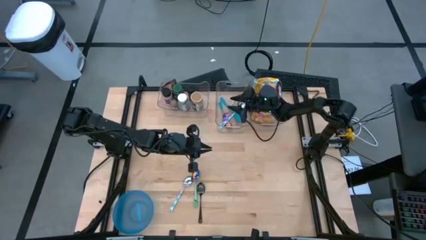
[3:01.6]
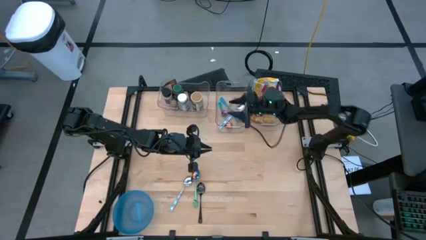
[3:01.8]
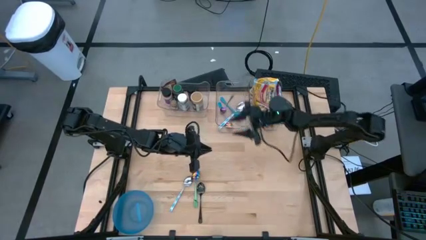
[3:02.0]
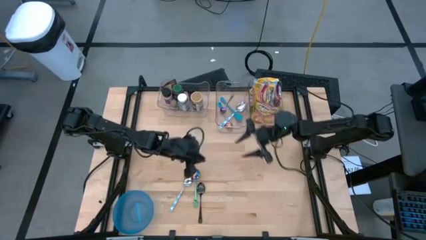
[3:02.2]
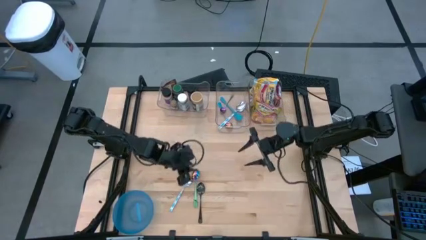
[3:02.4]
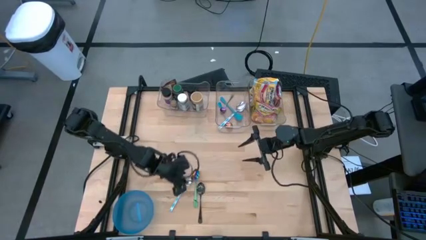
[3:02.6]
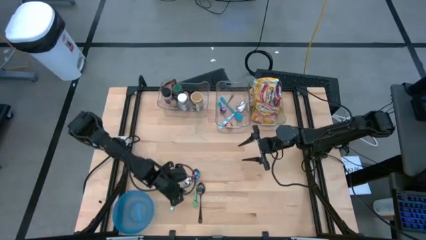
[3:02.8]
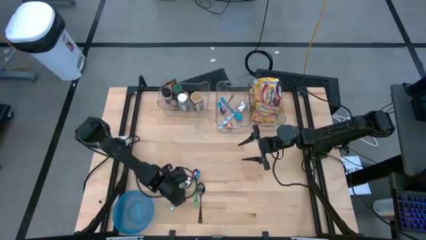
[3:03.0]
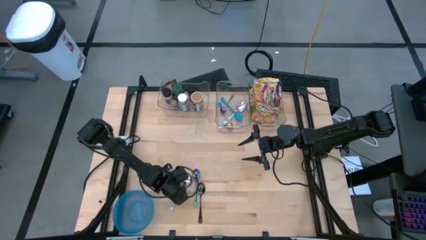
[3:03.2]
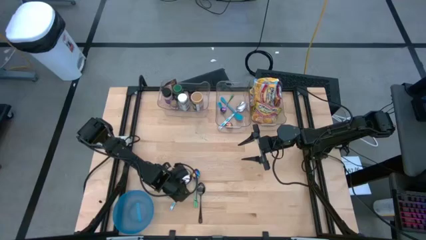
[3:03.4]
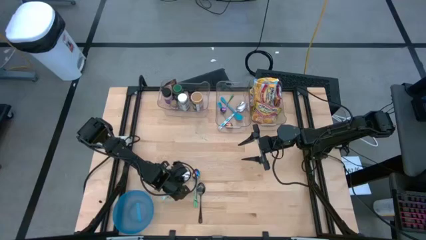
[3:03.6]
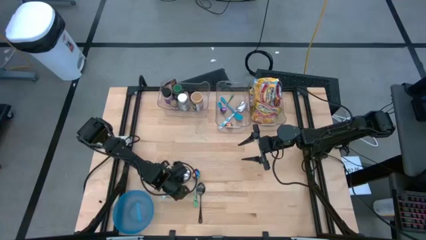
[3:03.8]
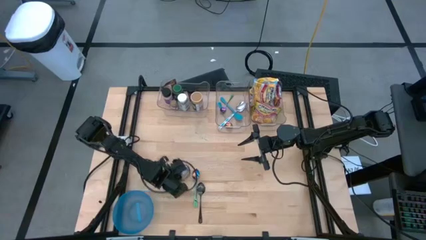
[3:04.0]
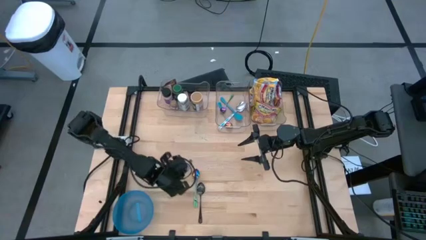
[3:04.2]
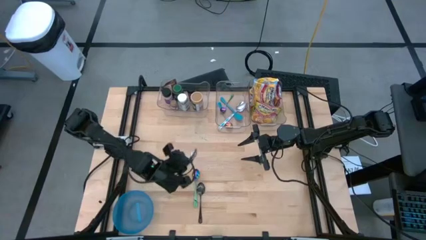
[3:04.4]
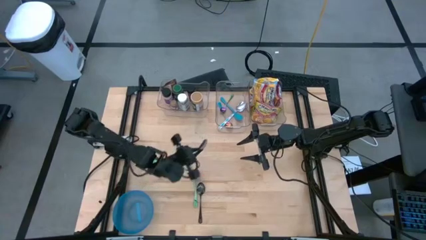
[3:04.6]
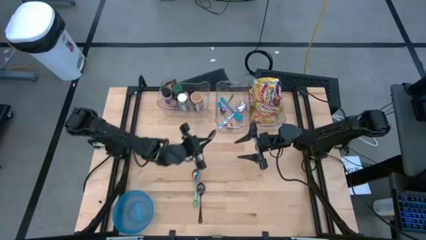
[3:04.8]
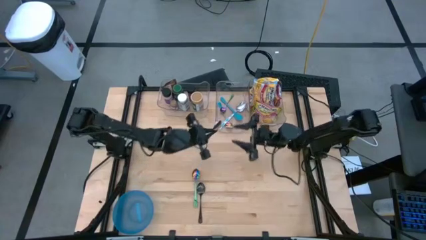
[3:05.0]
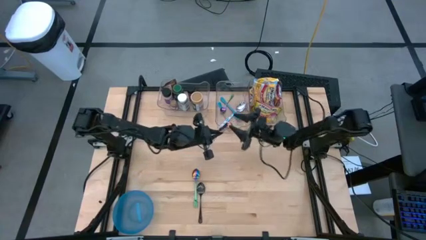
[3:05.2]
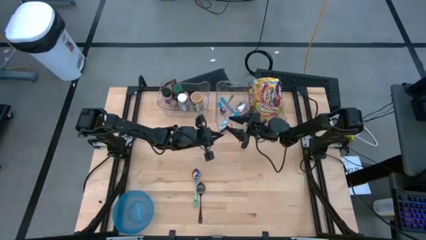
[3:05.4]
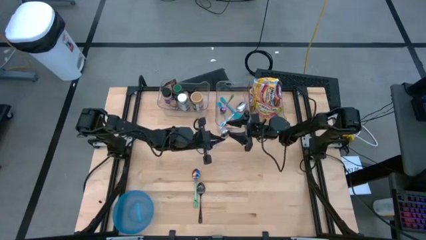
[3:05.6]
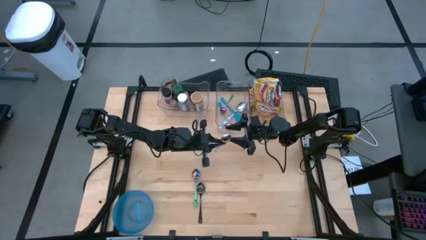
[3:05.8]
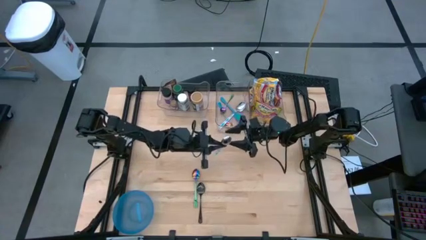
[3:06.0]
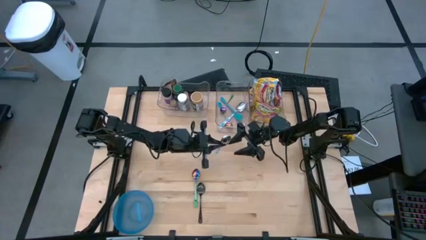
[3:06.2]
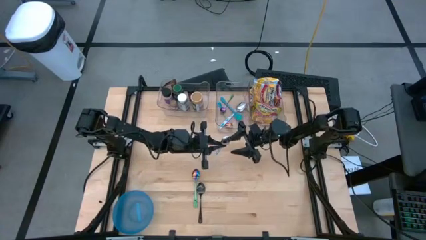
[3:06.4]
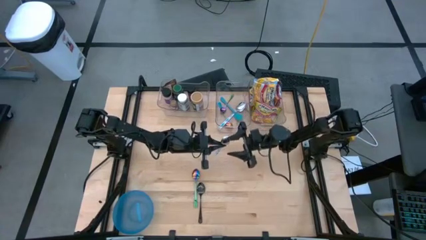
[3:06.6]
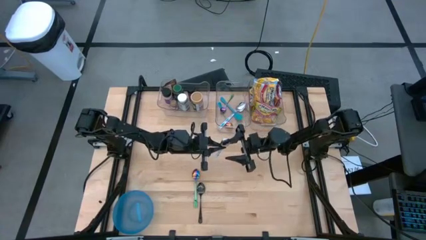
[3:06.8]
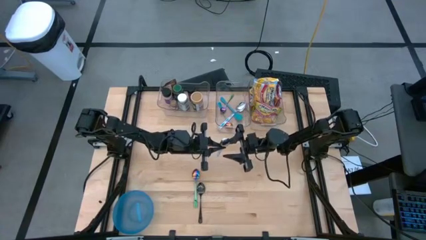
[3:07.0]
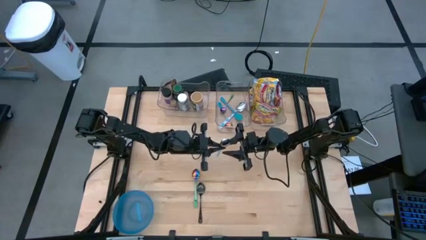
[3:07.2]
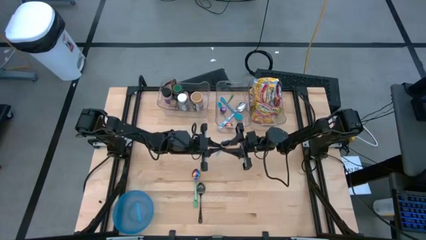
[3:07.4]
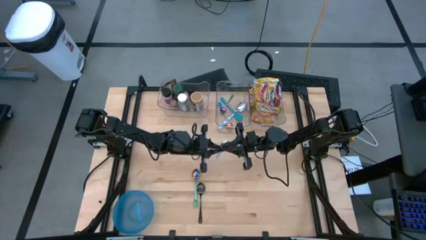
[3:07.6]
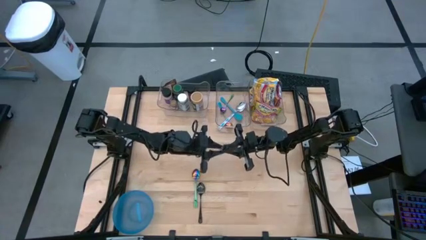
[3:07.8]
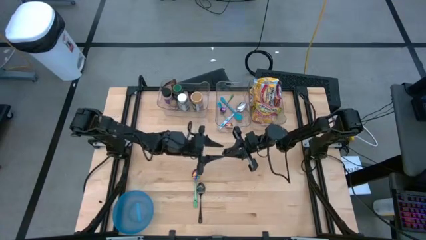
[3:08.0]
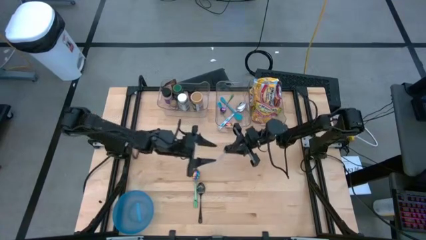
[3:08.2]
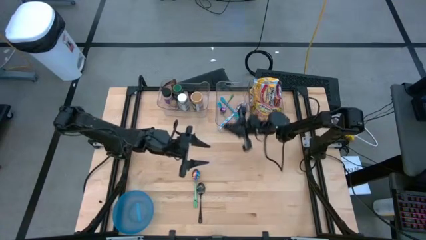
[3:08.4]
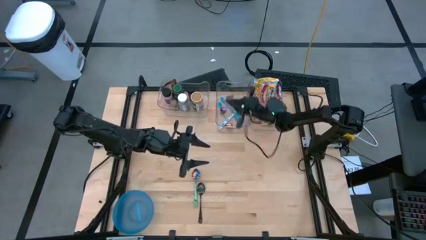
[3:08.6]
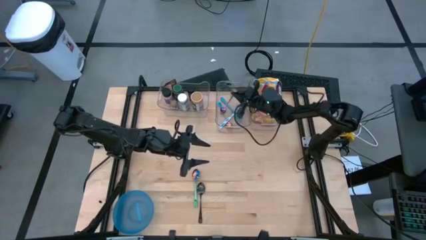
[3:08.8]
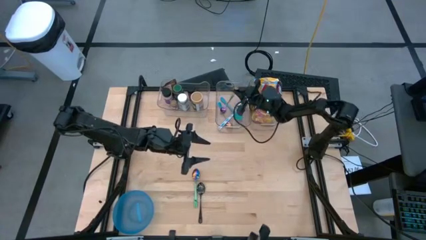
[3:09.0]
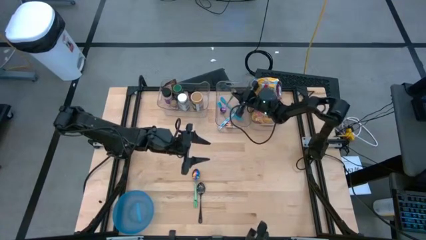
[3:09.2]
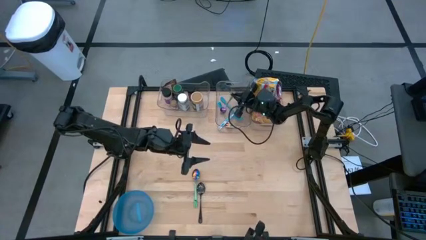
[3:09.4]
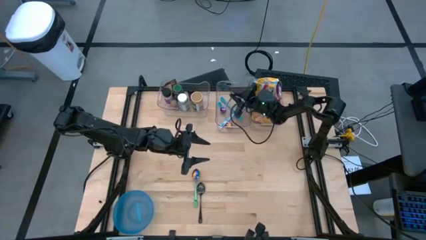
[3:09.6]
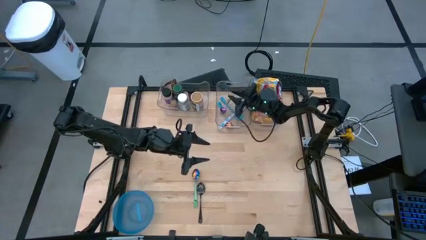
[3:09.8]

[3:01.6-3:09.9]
Task: Pick & Place Food Item
Put the silver spoon into the middle transparent bin

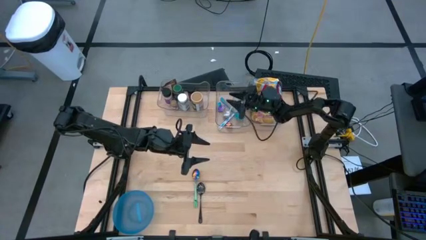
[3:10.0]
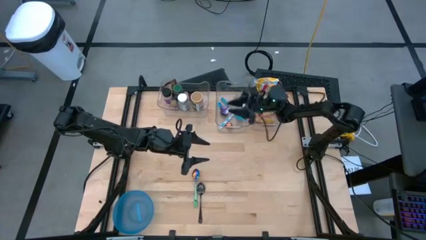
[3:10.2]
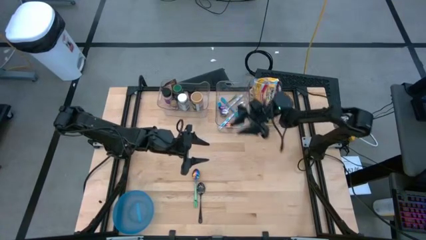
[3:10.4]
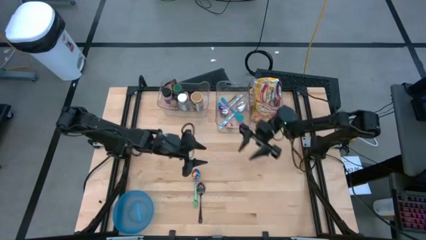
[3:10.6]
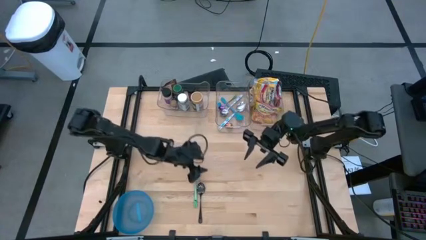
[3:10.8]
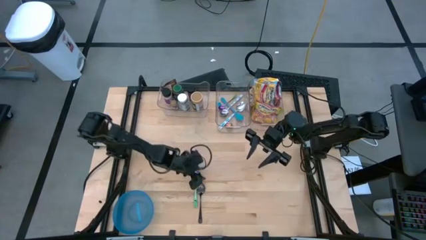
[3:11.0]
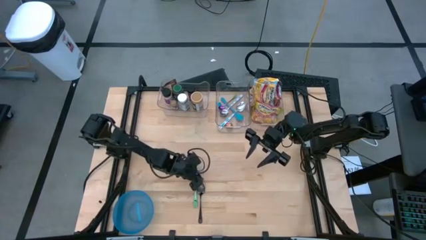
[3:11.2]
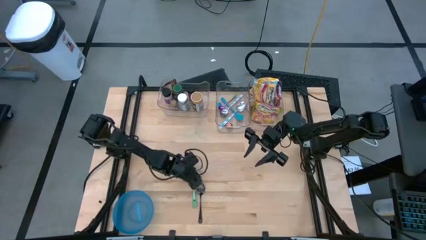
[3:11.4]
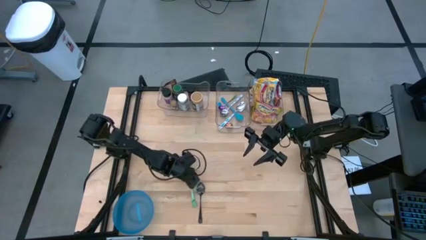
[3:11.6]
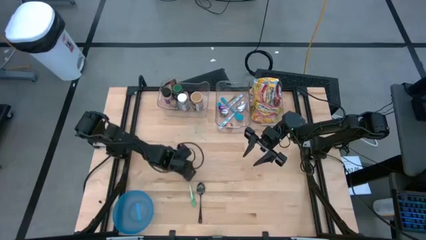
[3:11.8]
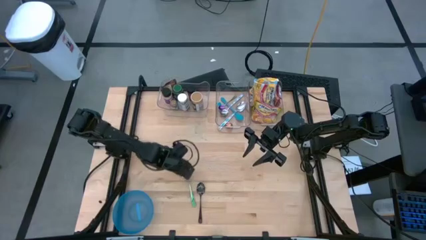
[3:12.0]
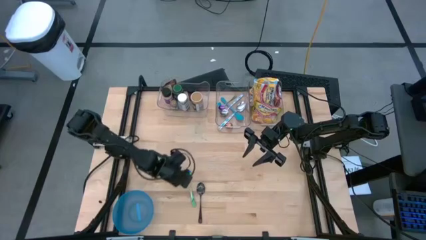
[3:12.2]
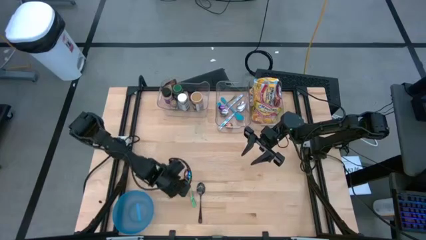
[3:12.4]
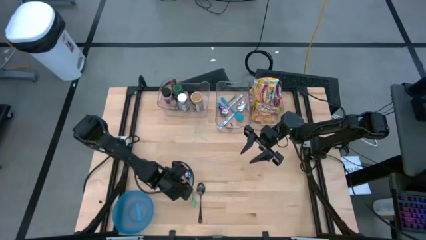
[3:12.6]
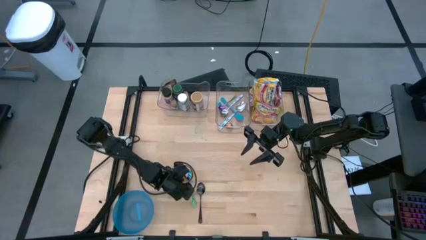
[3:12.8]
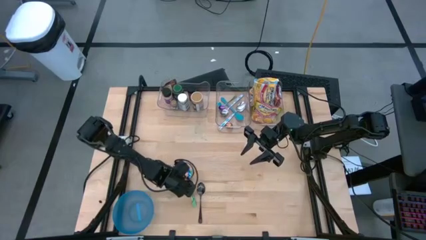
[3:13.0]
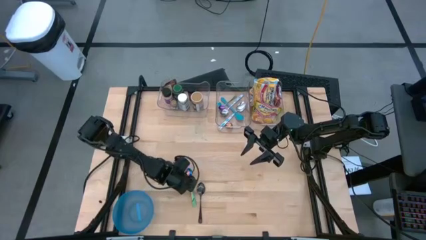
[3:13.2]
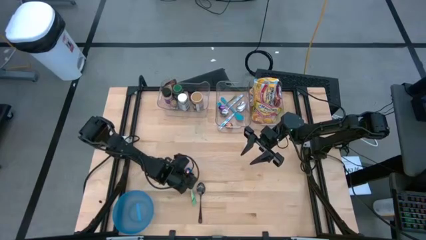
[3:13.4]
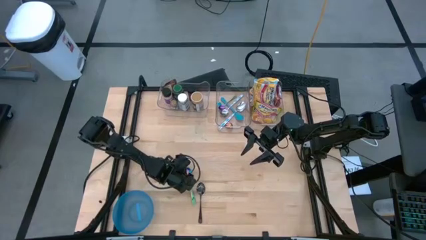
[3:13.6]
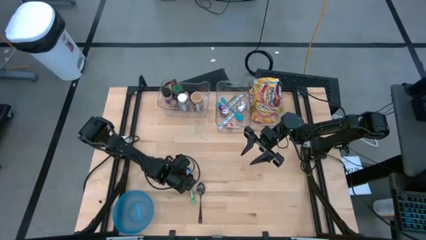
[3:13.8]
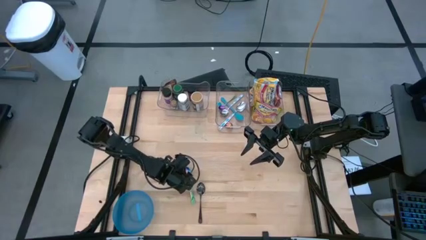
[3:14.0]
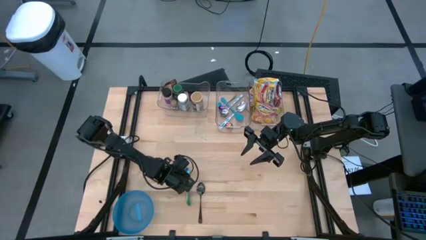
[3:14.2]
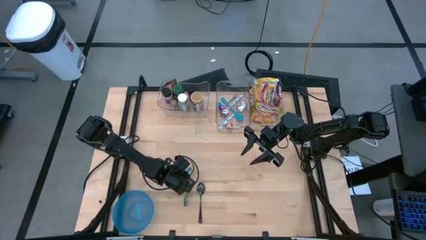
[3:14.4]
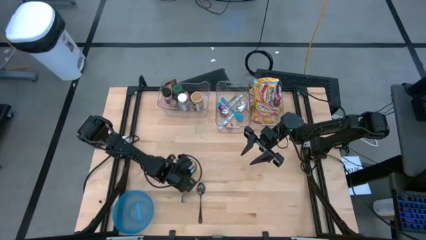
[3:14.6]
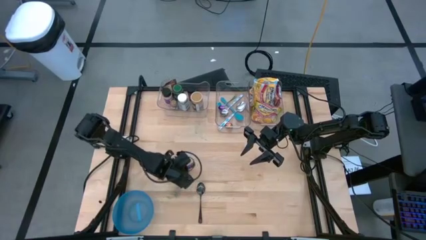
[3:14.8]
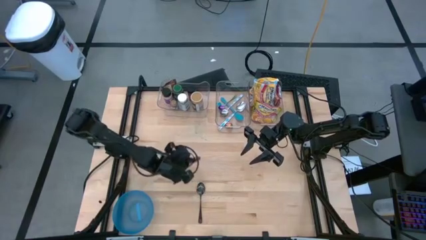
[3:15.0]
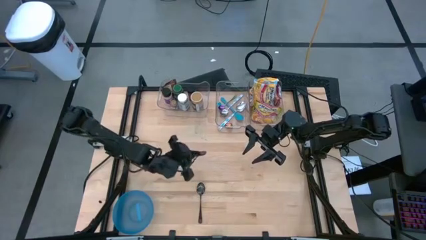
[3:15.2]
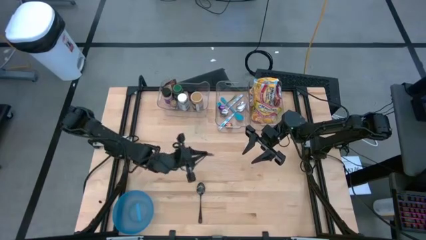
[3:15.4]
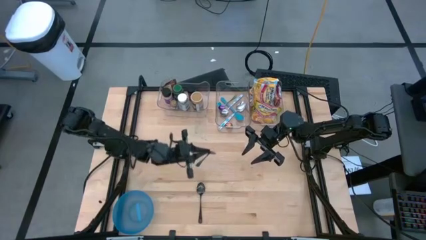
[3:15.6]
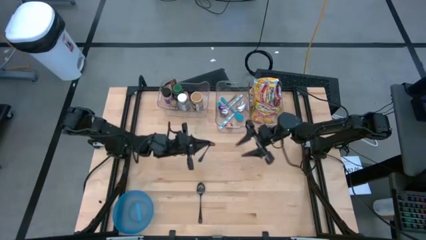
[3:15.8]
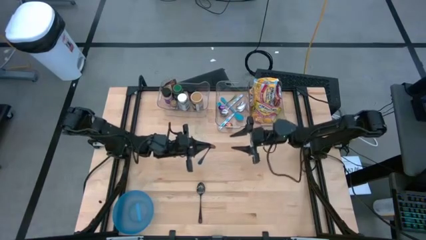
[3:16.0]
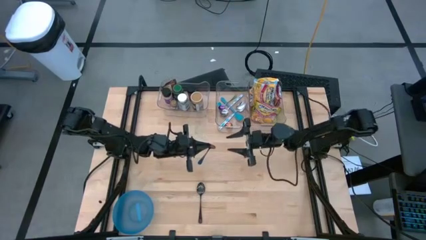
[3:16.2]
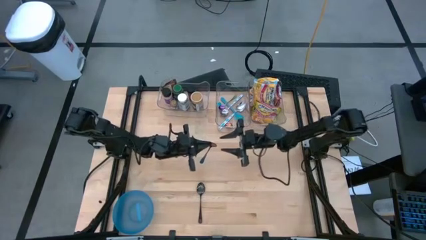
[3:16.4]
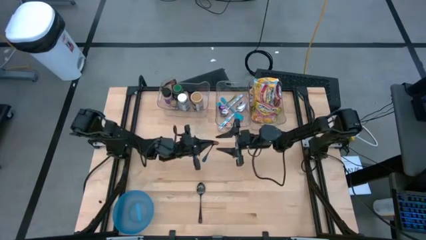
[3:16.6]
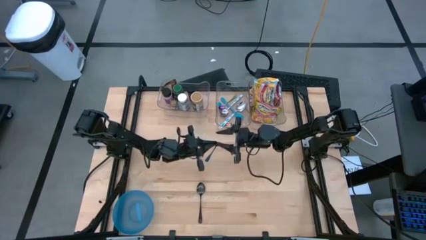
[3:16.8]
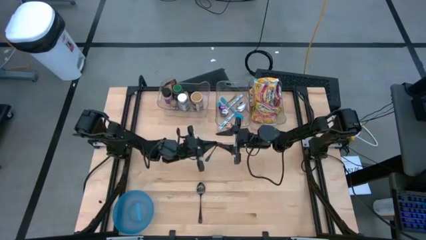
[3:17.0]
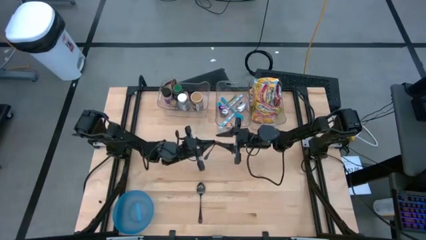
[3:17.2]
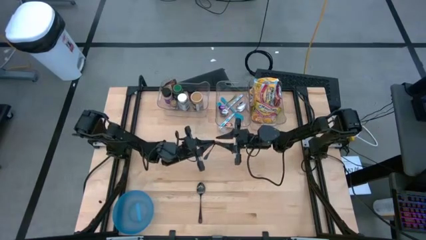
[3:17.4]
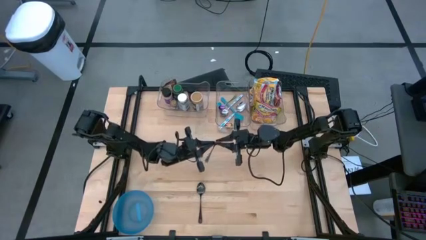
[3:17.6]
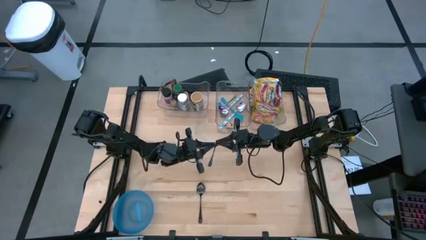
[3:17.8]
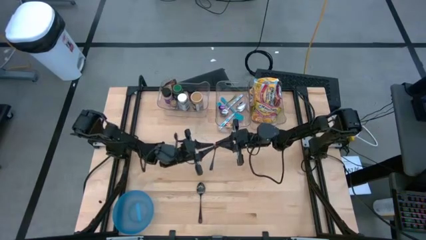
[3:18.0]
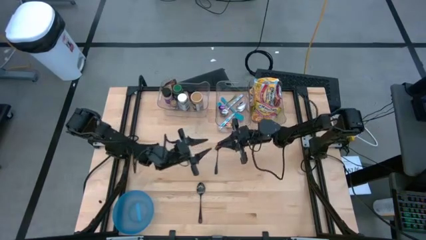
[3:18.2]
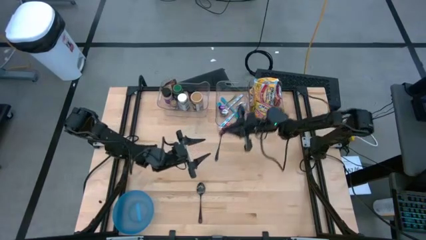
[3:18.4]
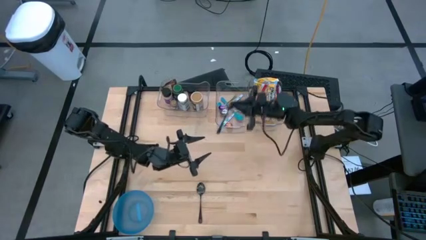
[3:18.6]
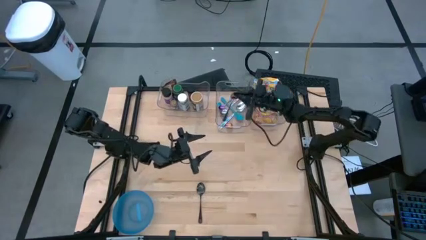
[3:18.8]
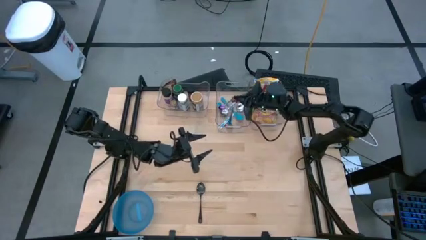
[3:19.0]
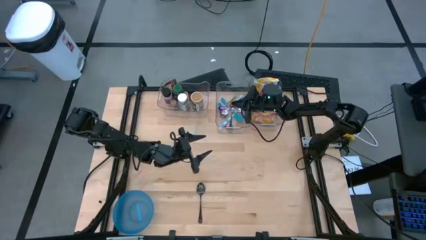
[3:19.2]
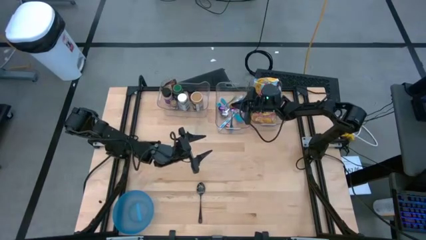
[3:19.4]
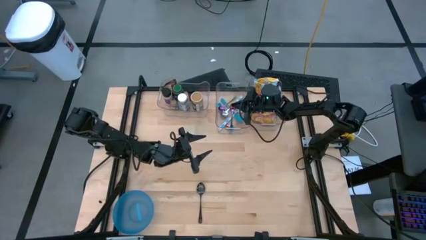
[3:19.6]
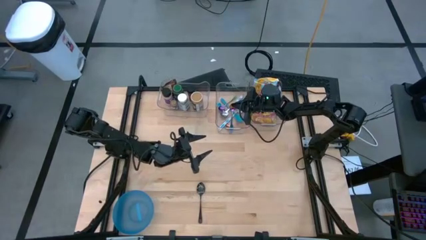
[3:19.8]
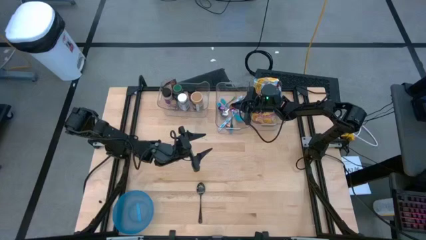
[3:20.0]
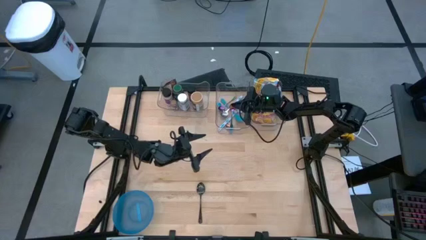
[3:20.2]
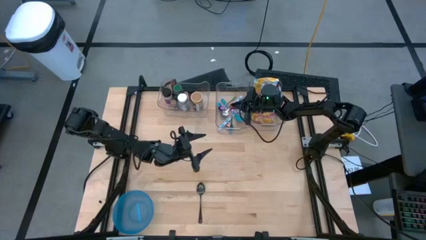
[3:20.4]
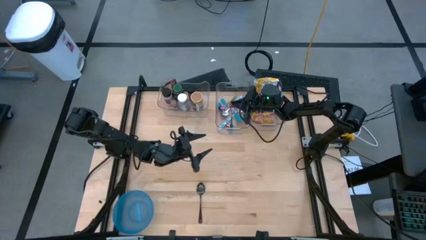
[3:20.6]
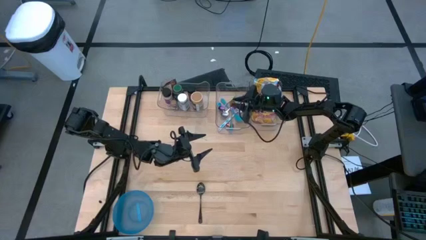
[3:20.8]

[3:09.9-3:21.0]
Put the purple spoon into the middle transparent bin
